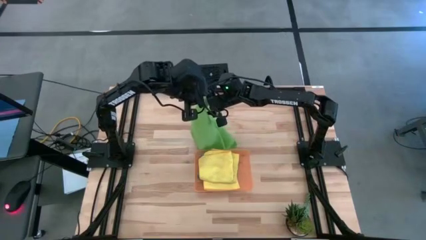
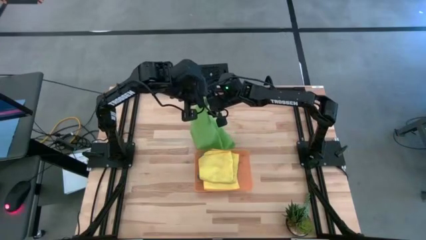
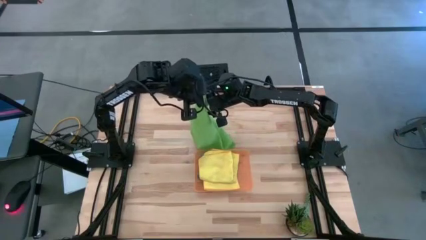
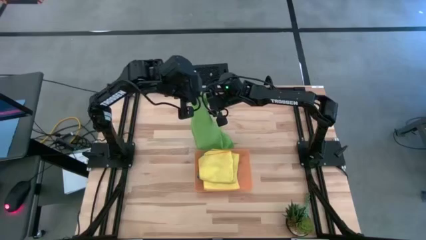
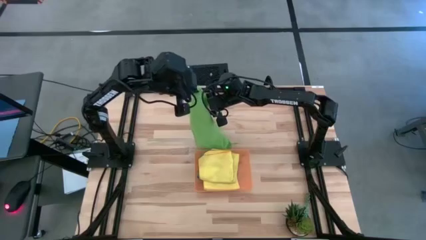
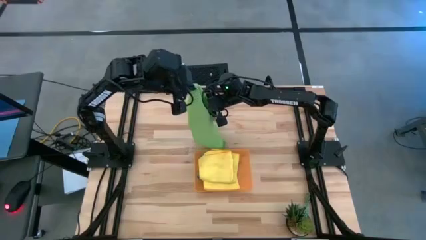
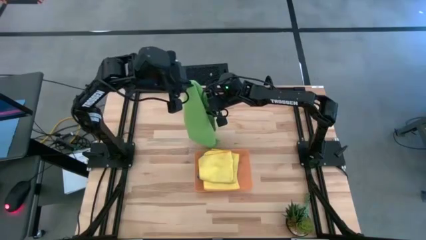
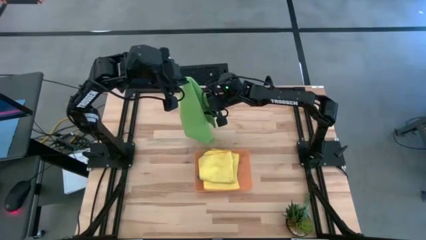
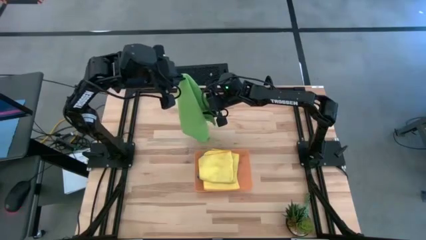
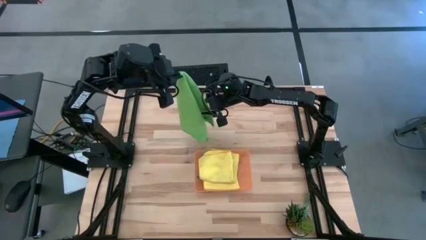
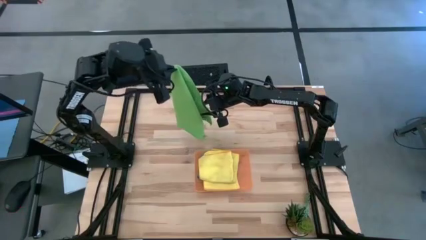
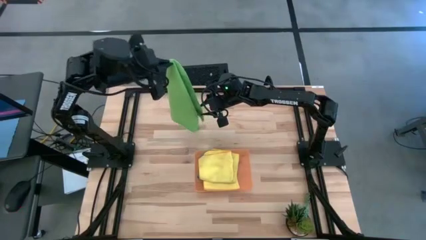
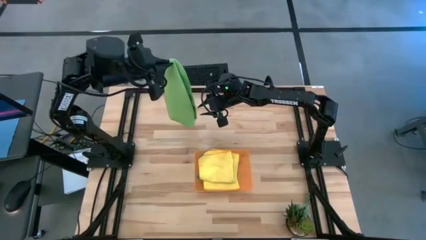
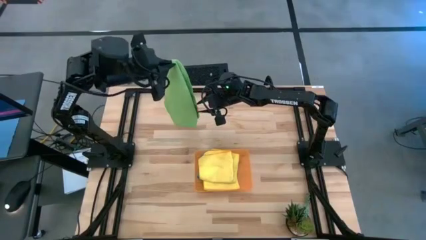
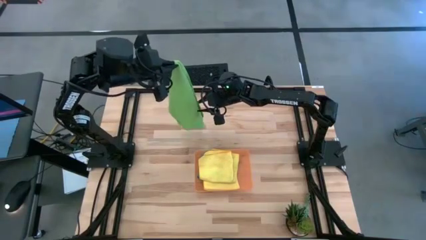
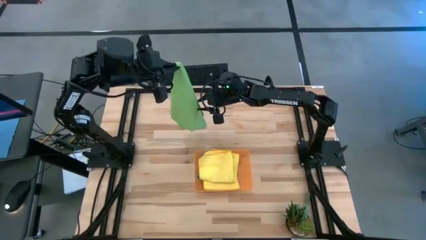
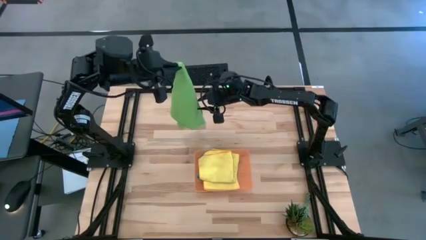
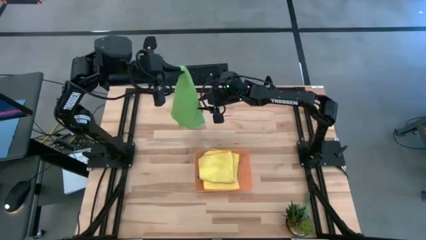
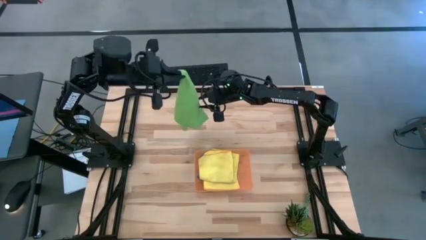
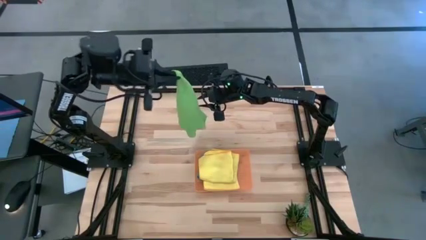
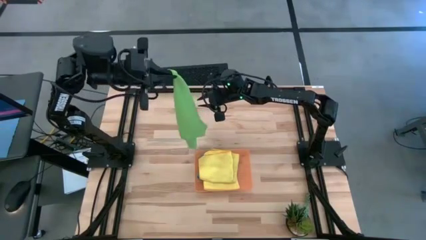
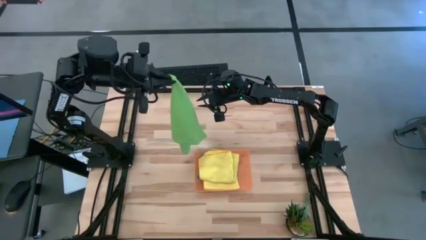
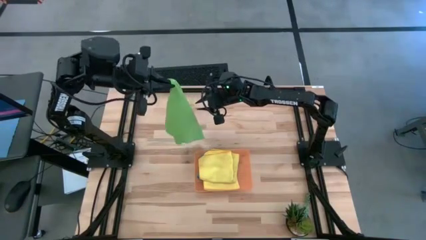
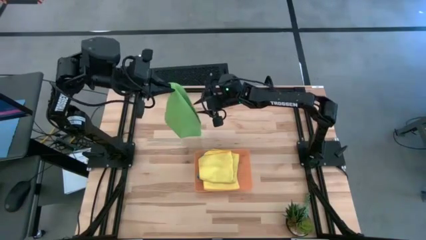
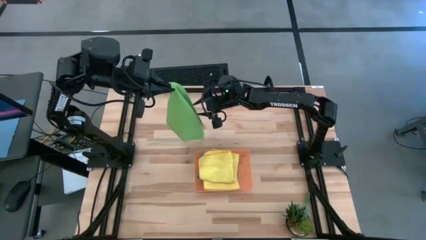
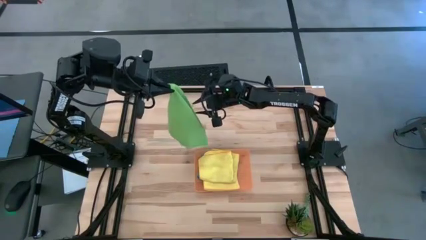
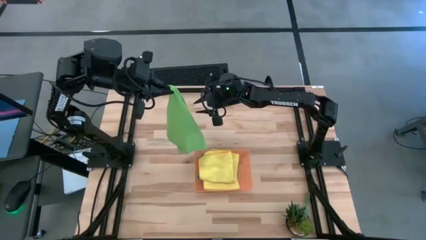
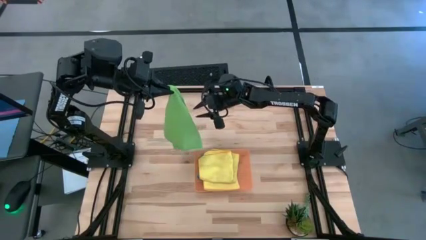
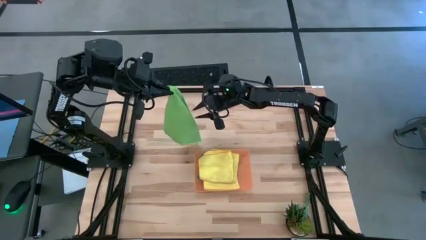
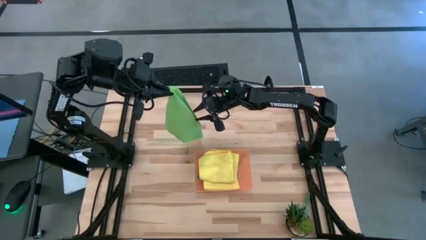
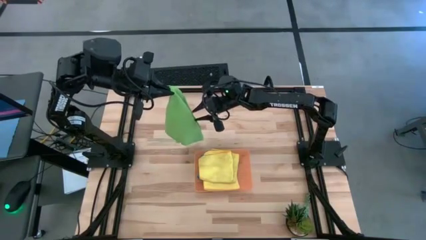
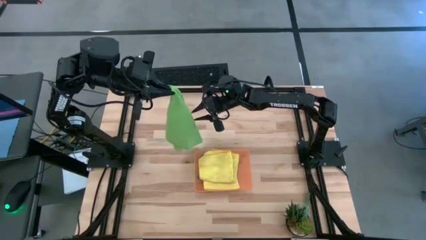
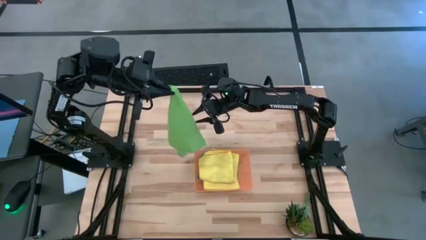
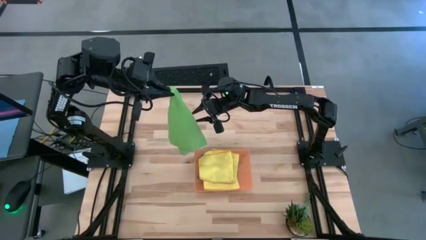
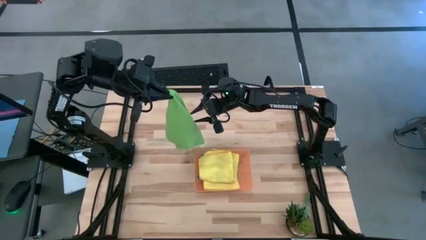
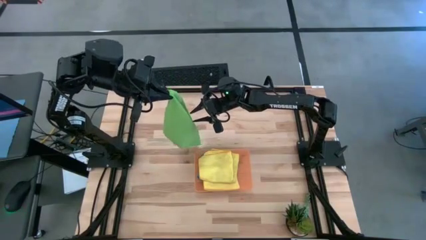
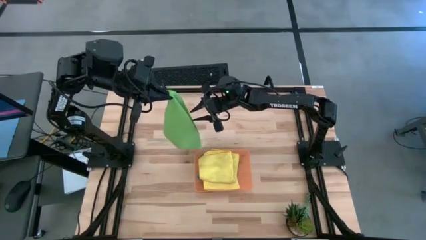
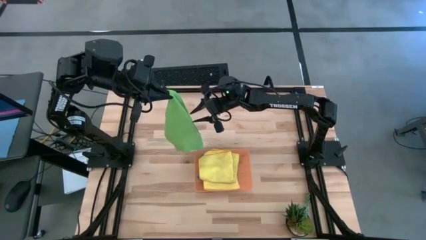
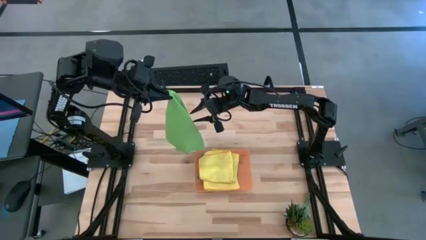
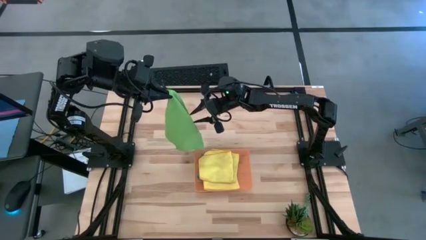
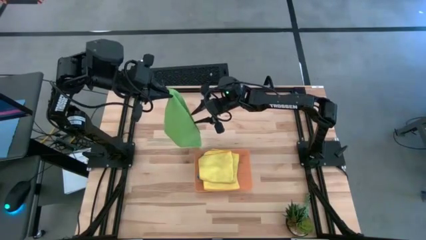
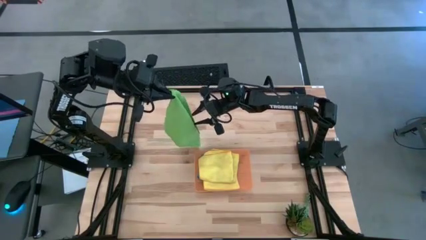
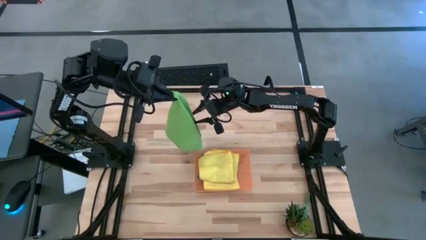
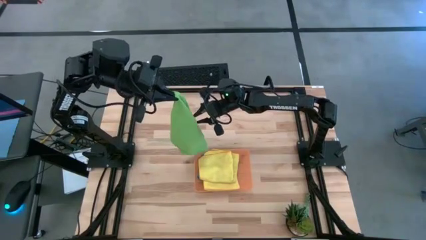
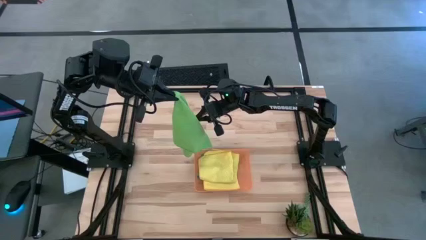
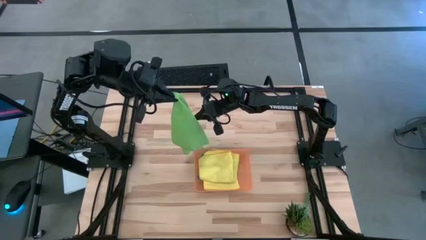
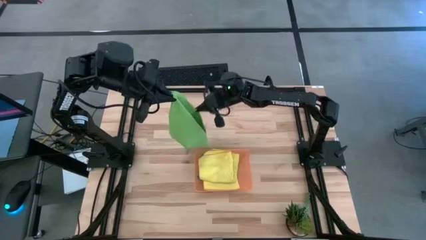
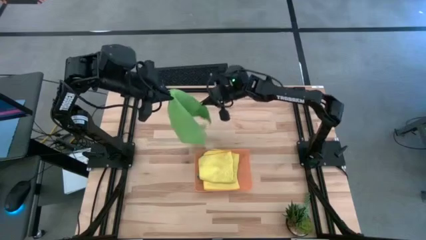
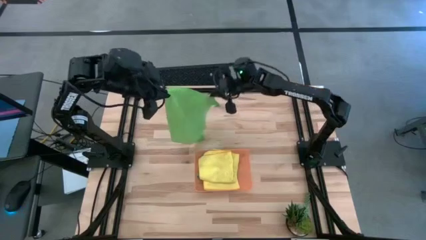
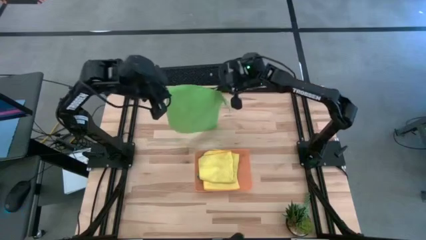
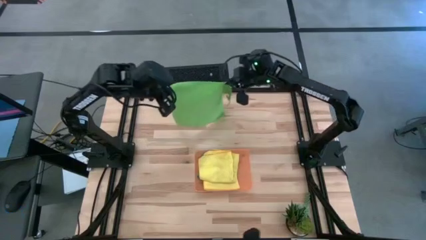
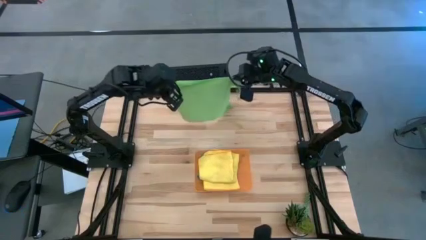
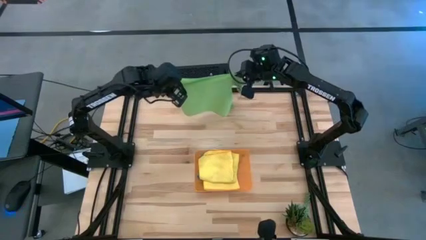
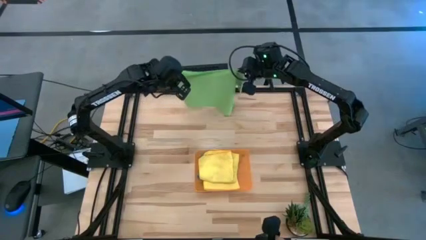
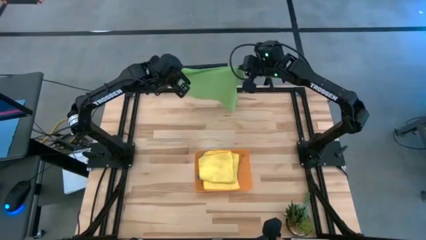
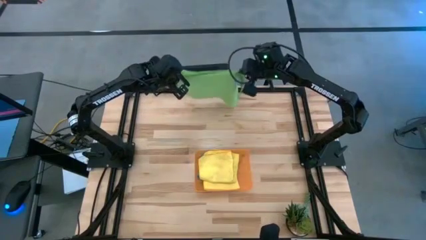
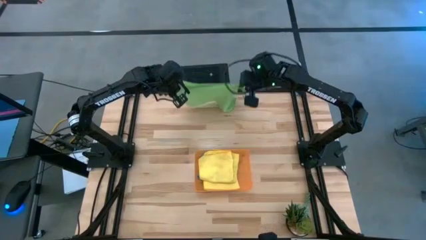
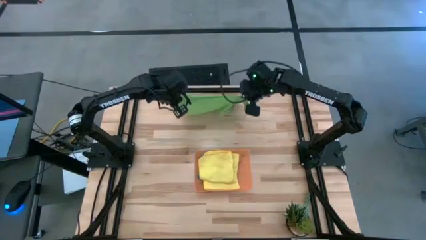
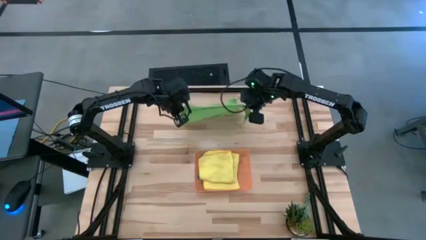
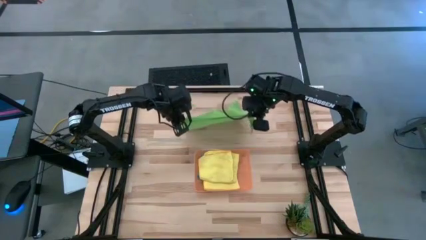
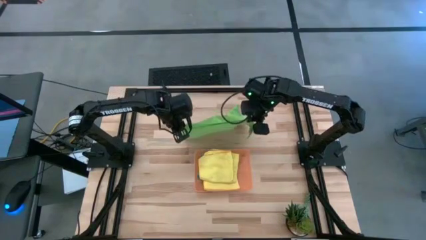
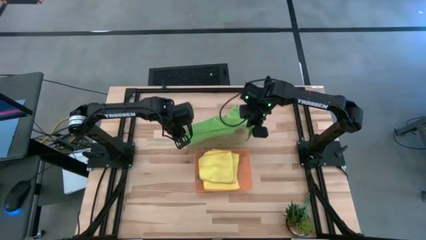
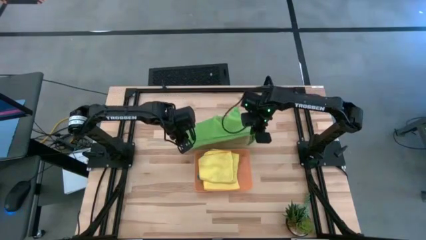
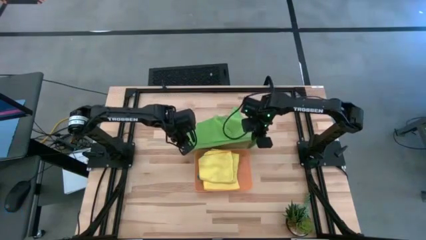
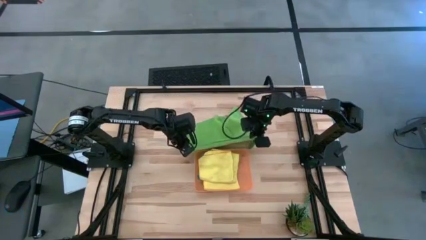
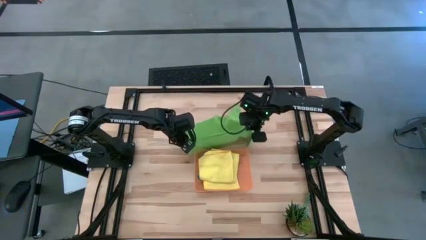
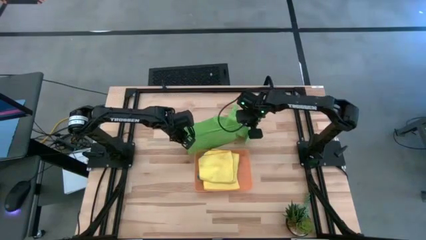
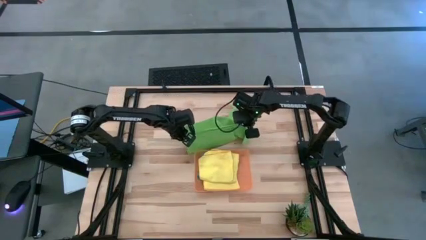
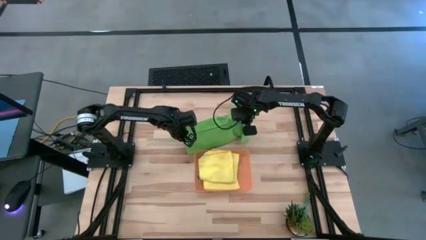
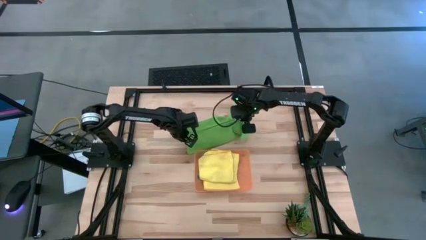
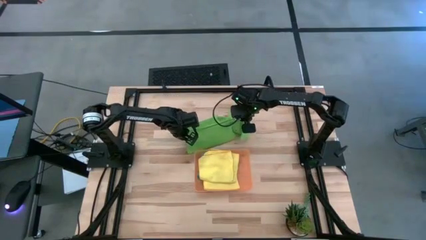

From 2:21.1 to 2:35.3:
Task: Fold microfiber towels
Fold the green towel
